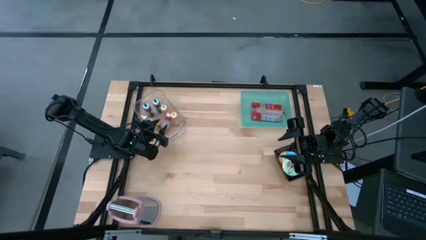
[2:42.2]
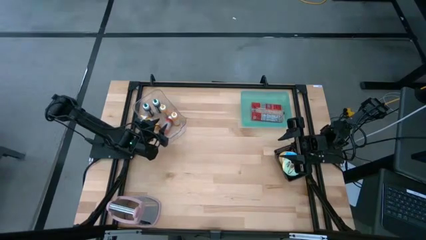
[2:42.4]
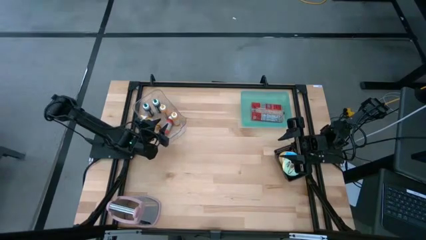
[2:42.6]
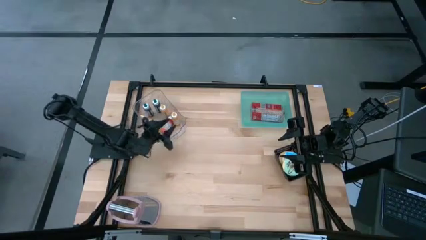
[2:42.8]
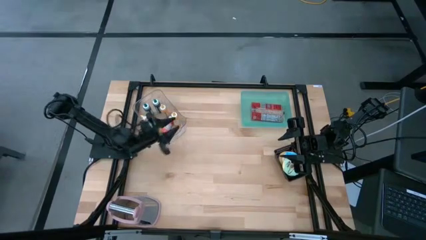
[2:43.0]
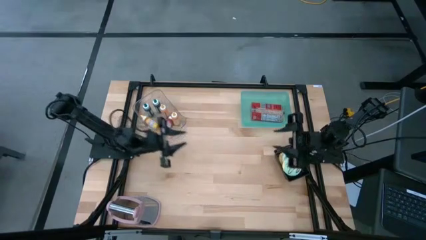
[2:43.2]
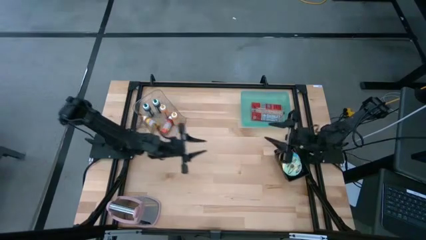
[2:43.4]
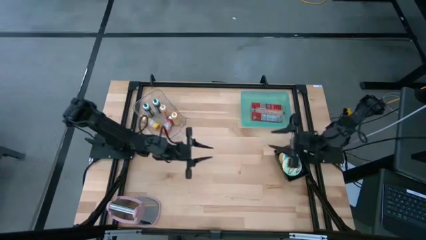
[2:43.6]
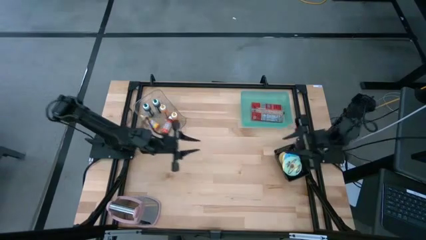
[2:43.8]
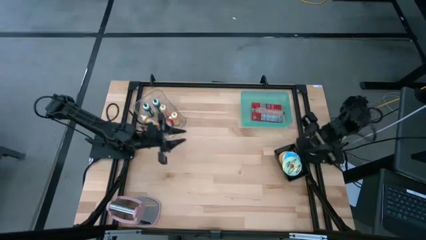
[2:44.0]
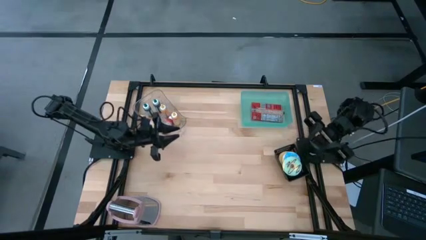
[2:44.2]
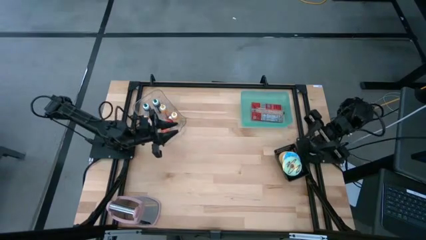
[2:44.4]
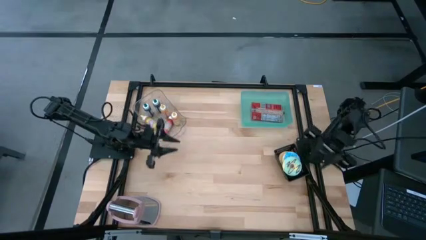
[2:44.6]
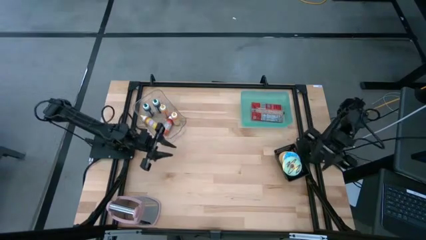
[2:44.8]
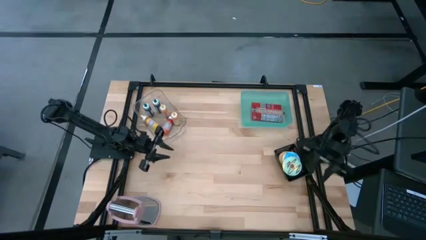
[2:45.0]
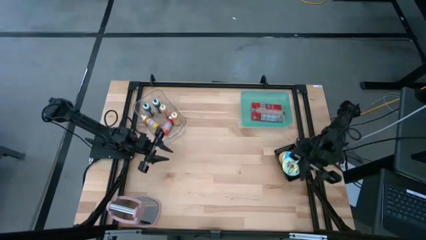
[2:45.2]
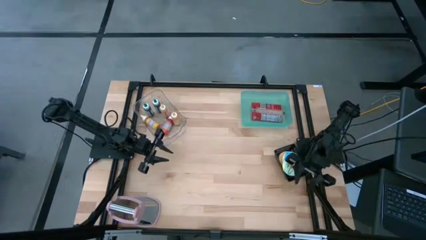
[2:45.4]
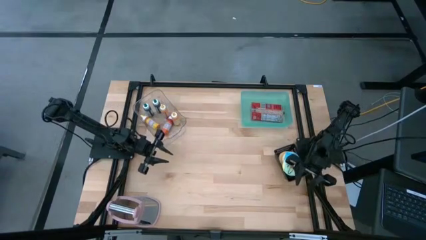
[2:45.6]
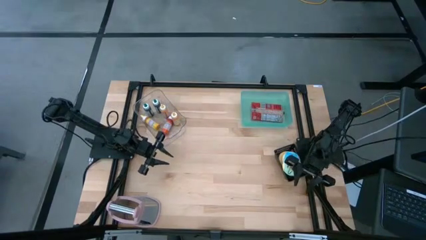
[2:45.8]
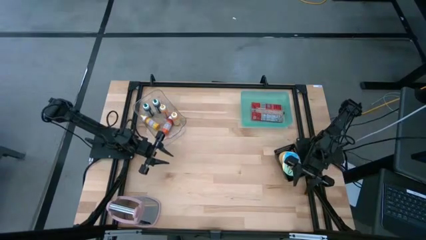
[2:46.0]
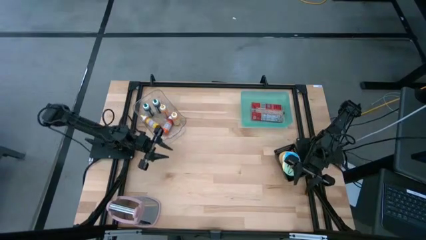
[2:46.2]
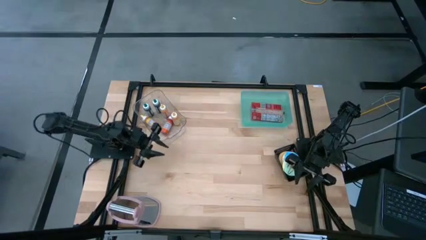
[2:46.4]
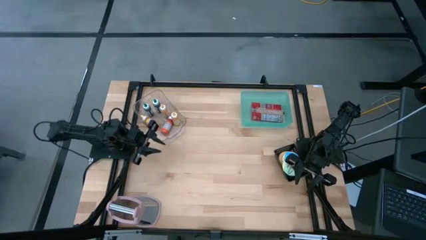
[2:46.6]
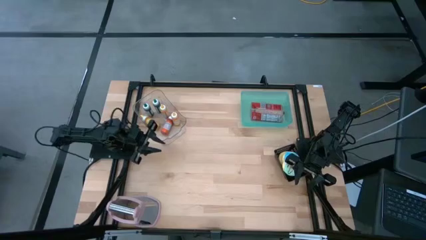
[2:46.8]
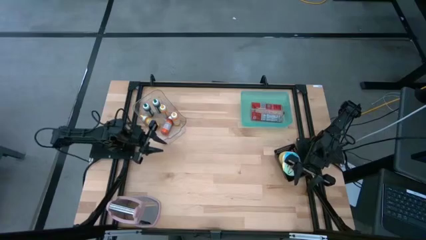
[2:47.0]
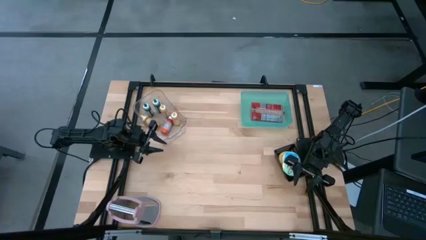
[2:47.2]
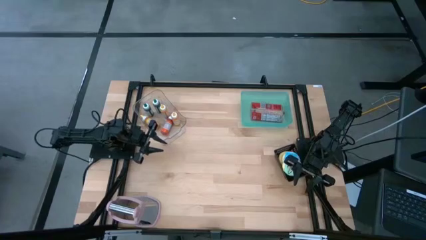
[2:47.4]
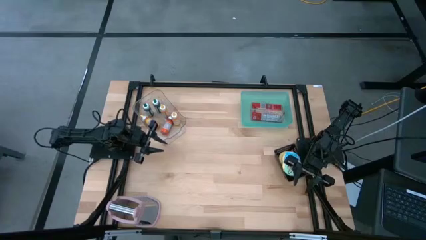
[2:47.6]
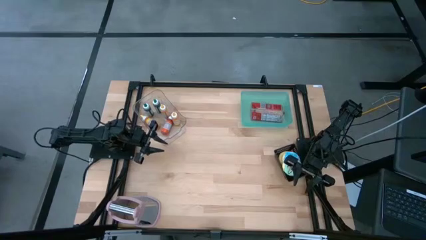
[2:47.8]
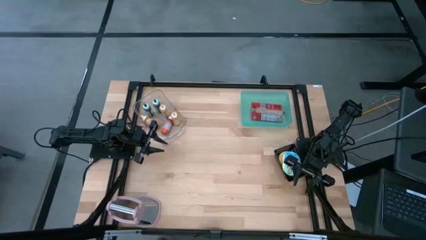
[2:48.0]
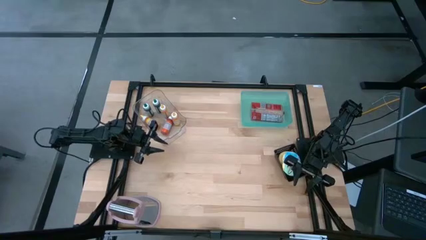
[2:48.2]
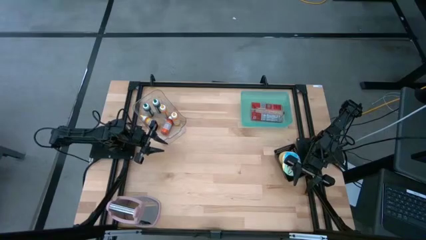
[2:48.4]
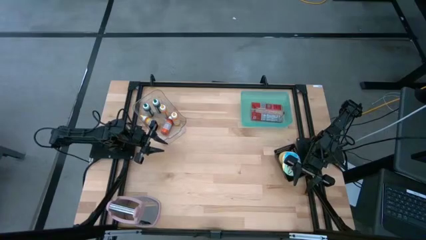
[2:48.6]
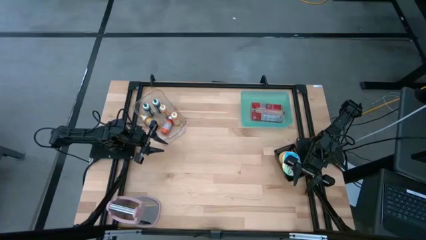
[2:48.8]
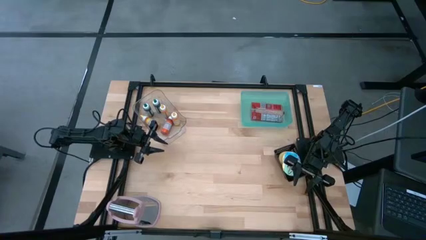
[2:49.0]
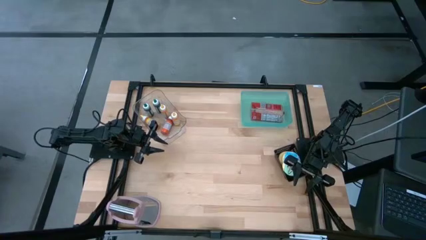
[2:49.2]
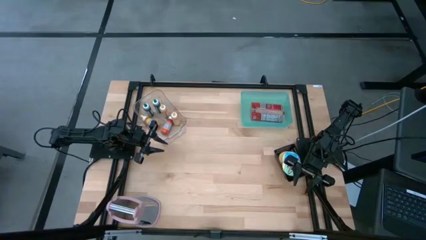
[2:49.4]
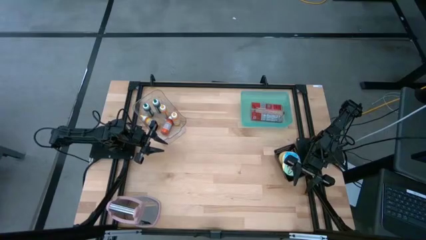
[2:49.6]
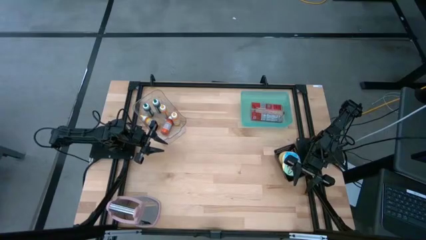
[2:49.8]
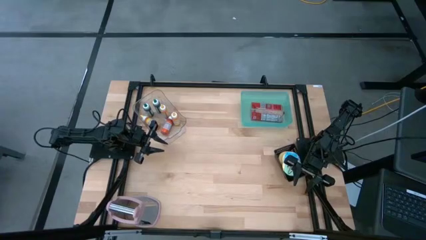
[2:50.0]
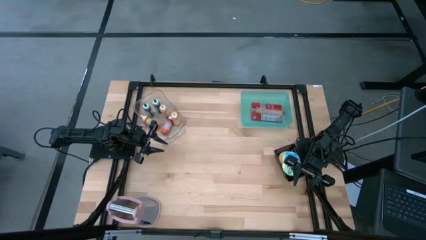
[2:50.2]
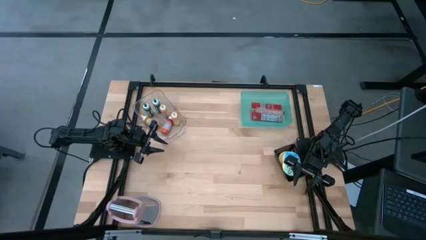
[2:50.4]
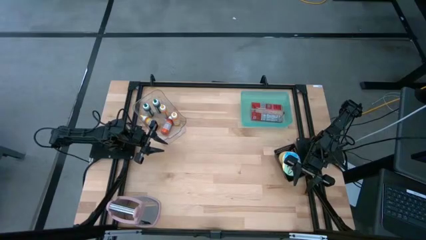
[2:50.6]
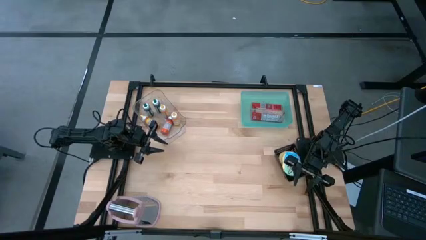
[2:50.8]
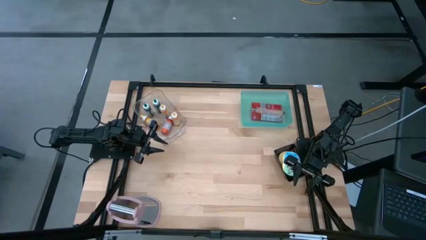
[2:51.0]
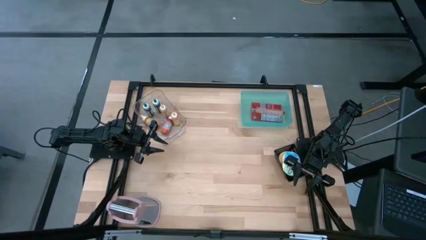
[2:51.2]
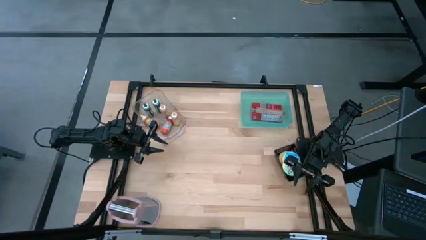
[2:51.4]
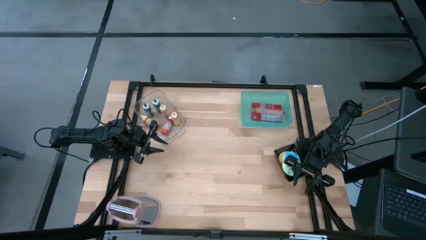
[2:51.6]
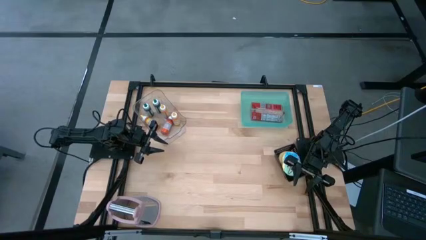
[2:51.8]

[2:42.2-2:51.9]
Return to Home Position
